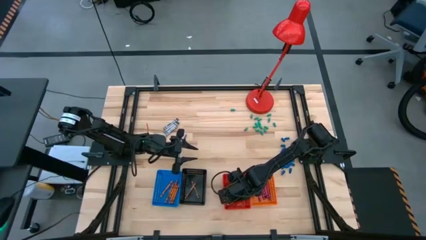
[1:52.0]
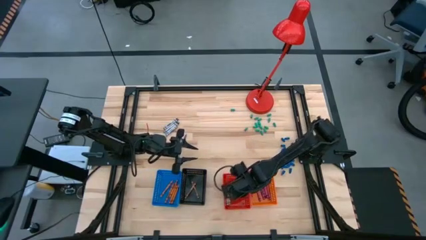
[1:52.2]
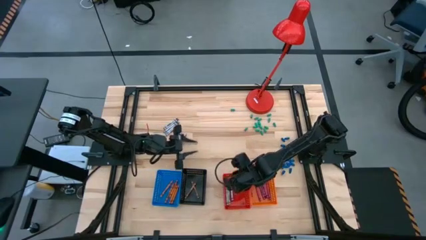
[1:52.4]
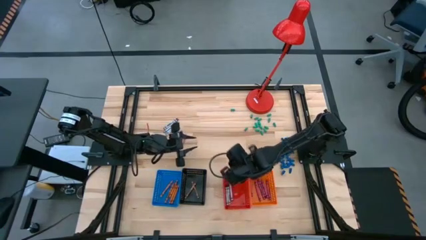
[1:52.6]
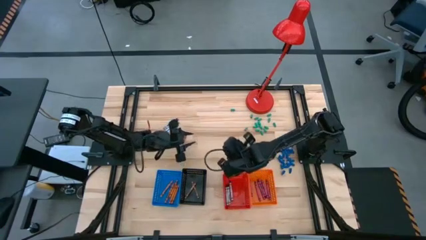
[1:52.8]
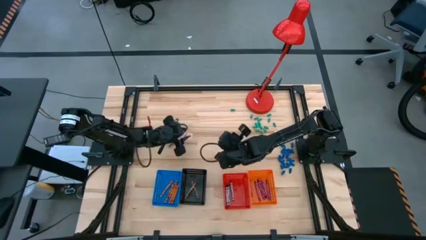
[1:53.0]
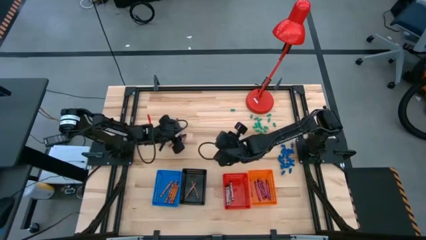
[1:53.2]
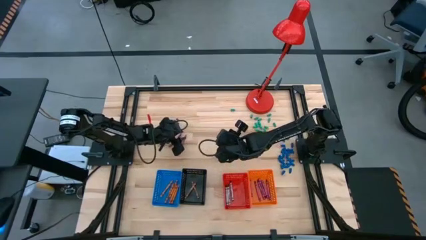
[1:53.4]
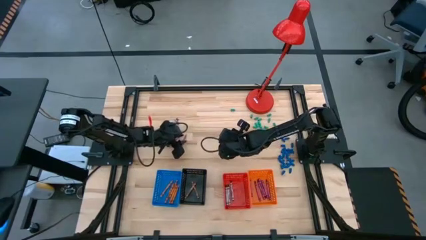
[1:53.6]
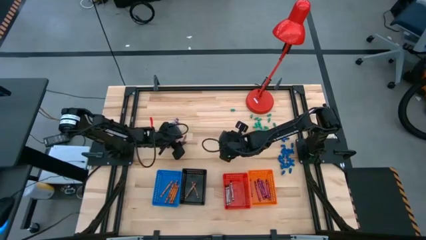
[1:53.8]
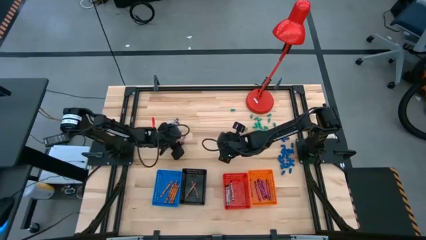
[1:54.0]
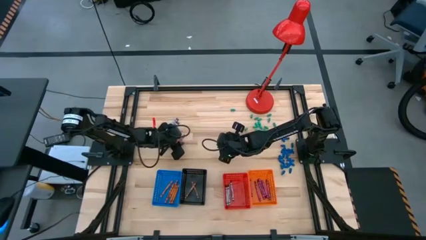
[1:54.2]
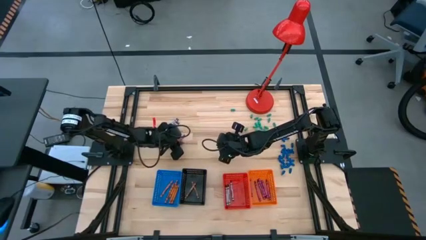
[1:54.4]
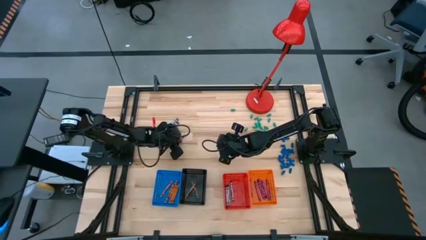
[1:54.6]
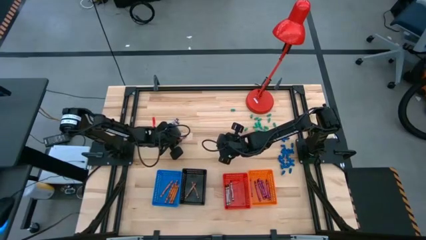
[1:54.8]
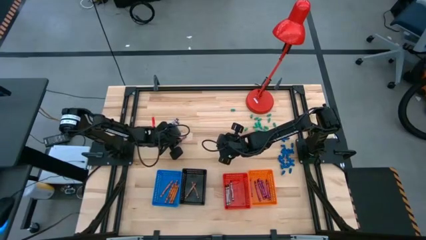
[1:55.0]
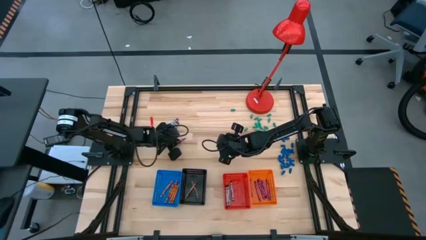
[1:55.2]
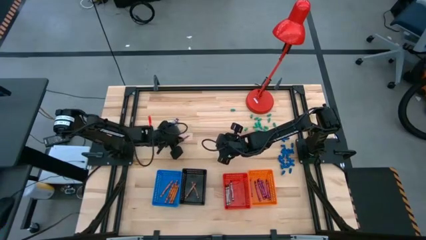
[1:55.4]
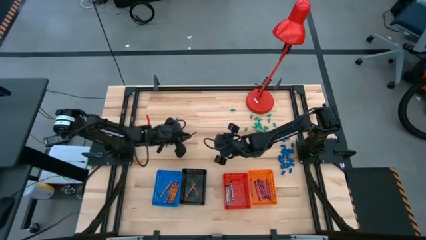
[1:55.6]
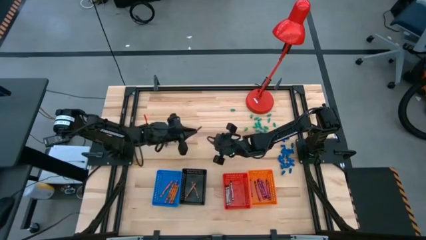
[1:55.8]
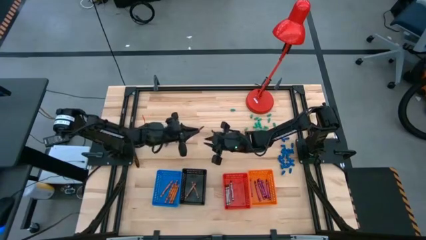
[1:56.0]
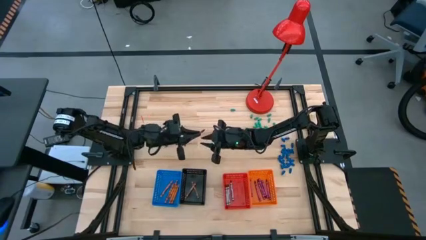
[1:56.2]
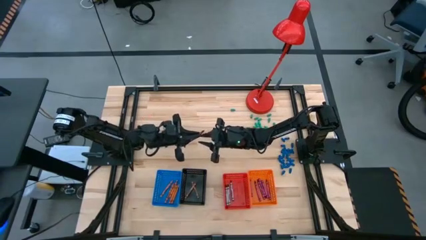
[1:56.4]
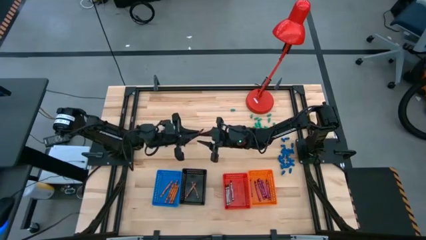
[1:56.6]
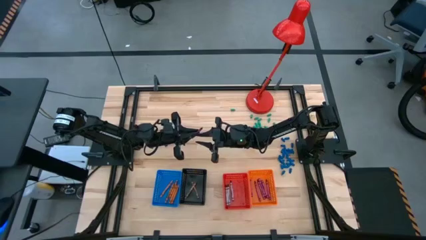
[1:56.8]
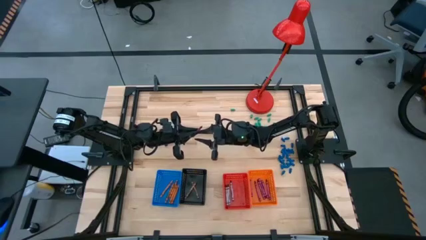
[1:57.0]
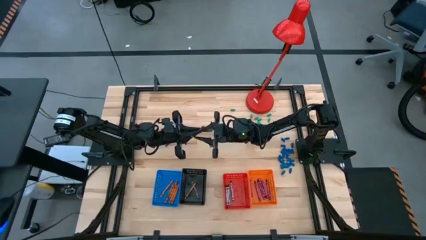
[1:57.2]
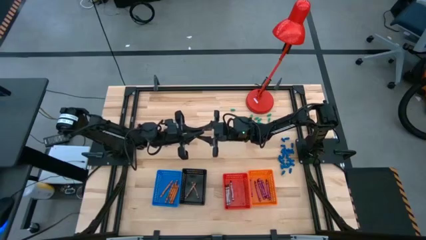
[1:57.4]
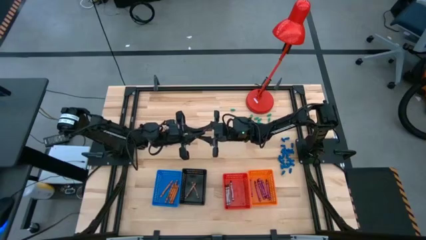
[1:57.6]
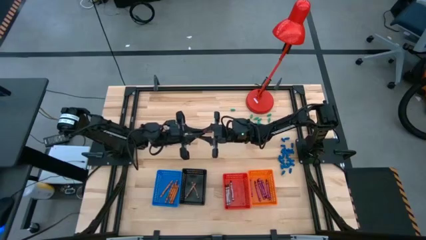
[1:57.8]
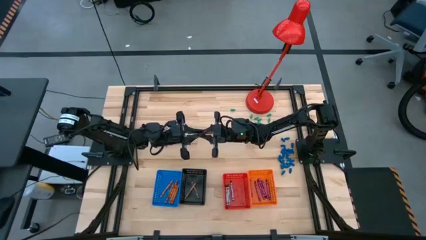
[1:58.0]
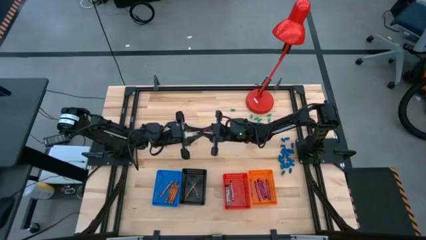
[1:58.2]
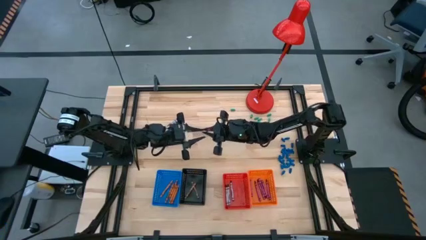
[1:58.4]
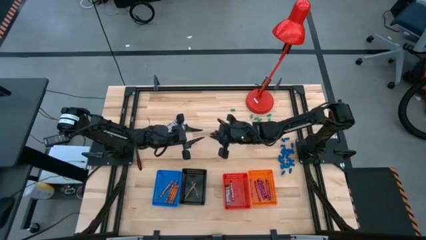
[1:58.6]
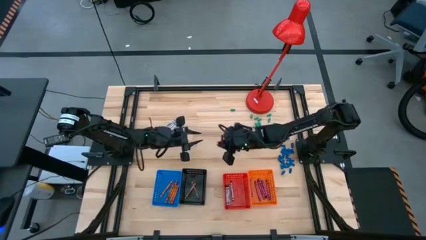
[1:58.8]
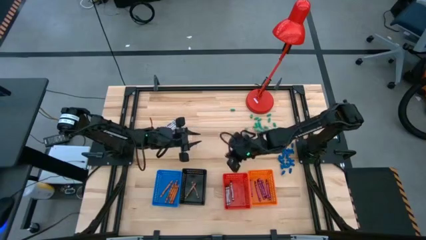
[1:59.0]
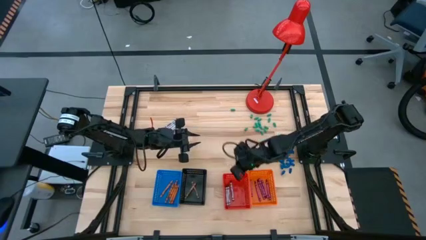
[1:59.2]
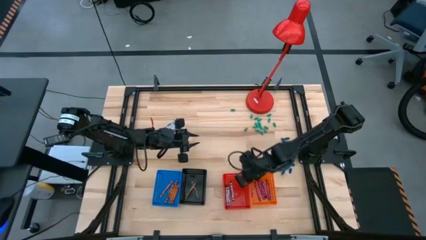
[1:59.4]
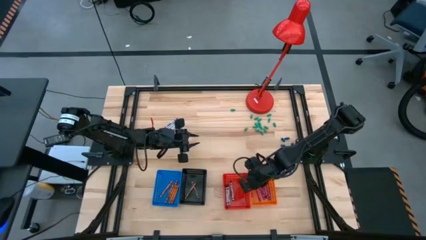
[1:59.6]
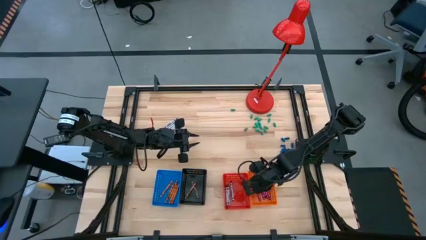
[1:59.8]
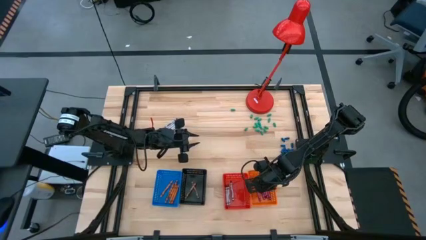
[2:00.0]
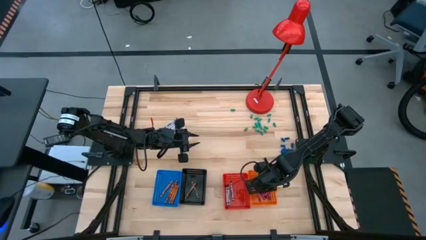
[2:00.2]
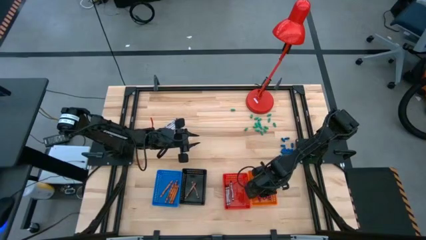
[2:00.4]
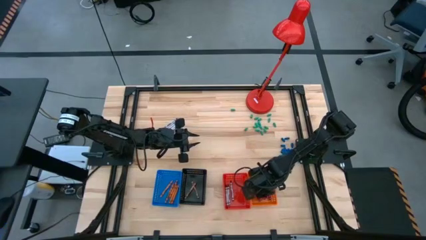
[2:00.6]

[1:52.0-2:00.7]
Task: Sort crayons
Put the violet crayon into the orange basket

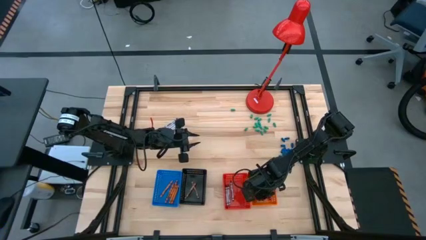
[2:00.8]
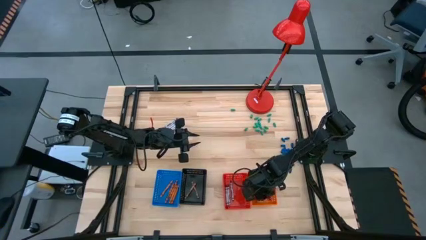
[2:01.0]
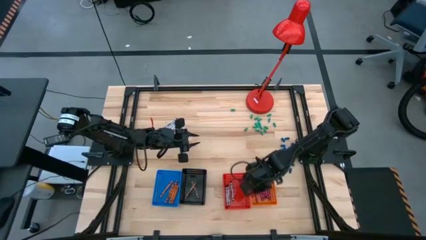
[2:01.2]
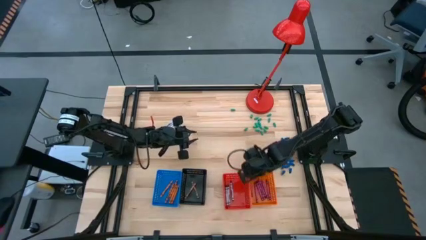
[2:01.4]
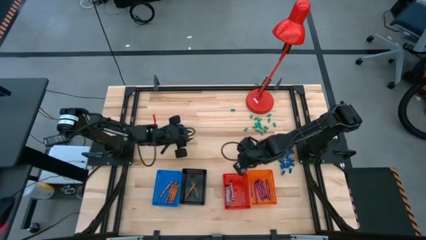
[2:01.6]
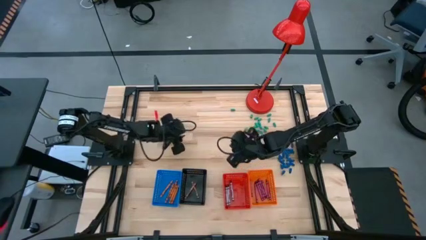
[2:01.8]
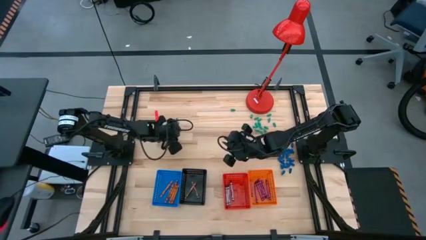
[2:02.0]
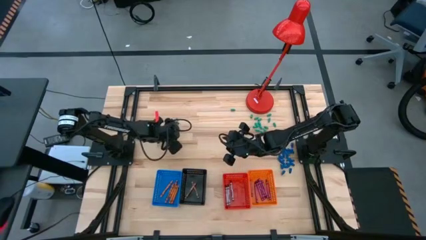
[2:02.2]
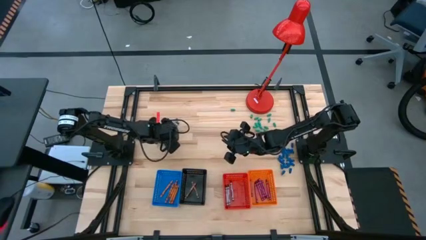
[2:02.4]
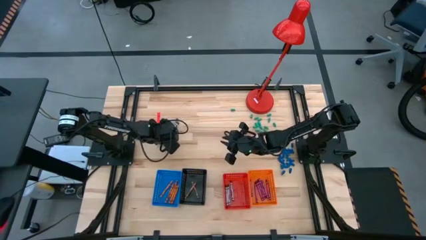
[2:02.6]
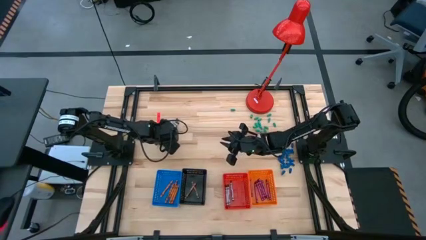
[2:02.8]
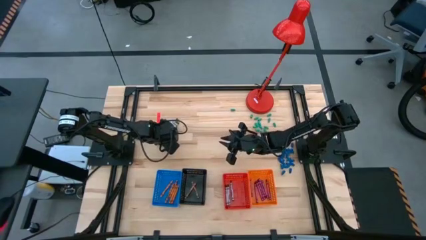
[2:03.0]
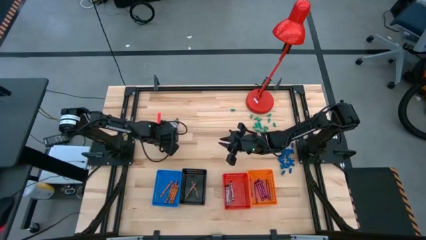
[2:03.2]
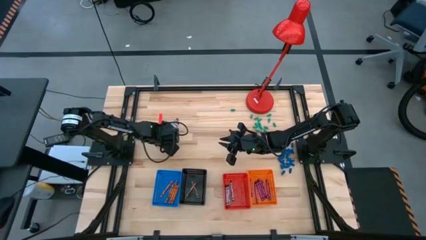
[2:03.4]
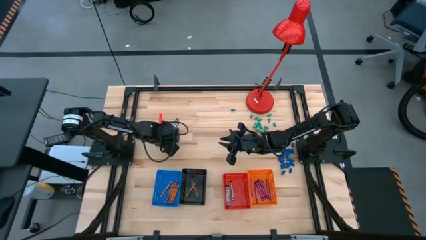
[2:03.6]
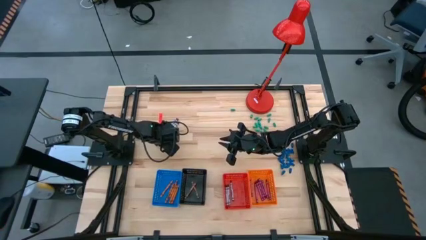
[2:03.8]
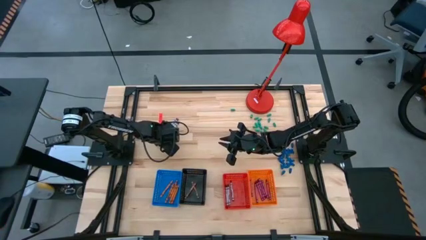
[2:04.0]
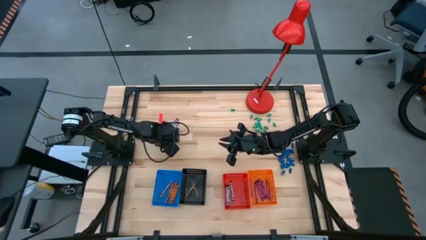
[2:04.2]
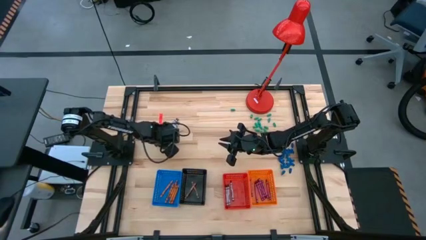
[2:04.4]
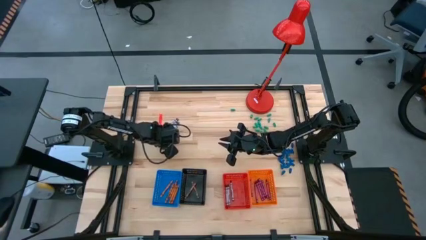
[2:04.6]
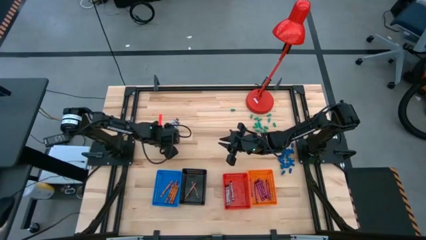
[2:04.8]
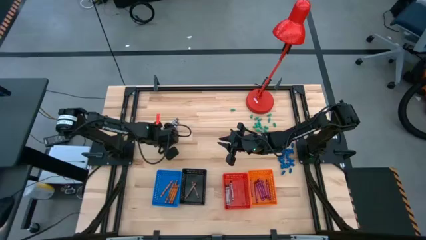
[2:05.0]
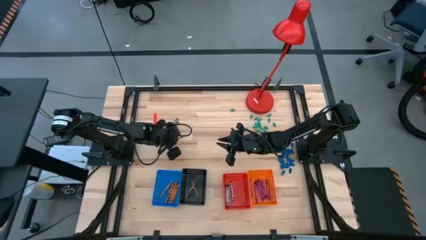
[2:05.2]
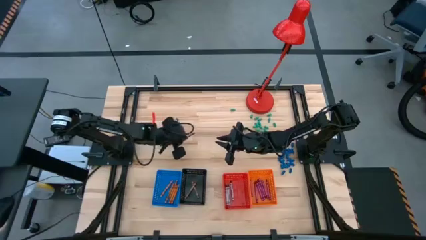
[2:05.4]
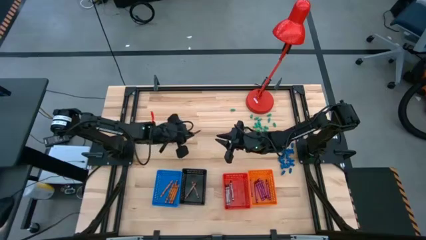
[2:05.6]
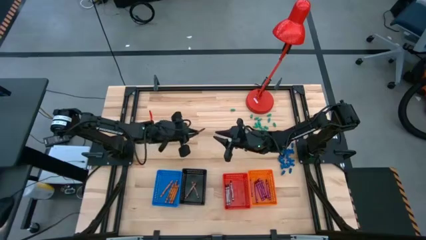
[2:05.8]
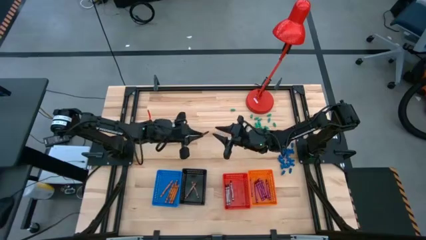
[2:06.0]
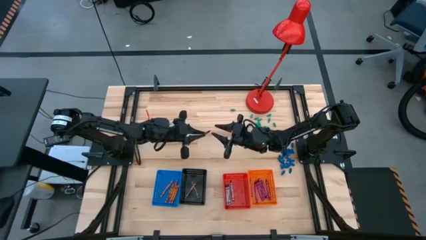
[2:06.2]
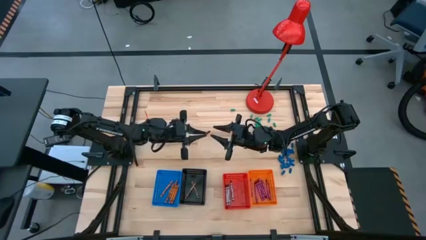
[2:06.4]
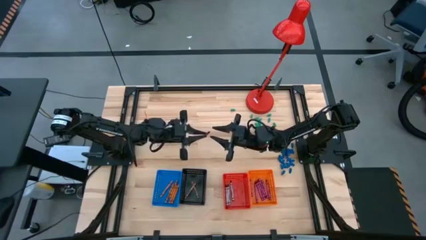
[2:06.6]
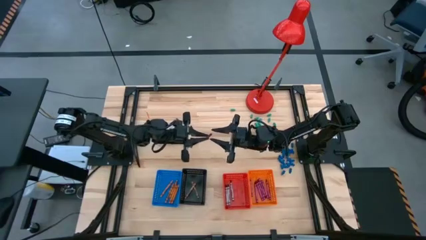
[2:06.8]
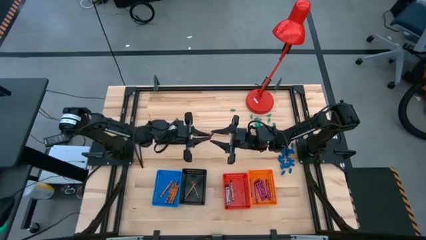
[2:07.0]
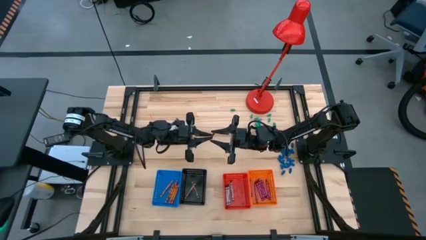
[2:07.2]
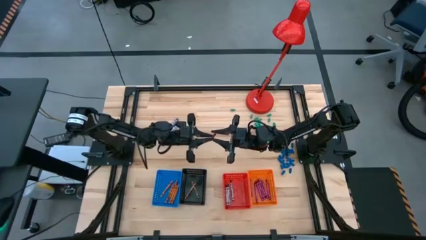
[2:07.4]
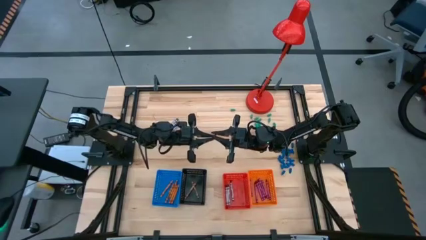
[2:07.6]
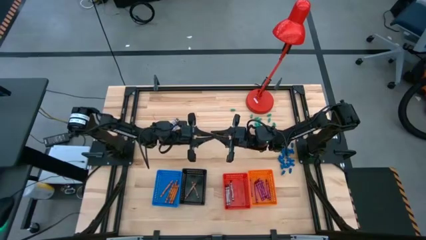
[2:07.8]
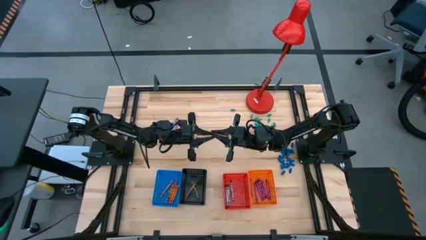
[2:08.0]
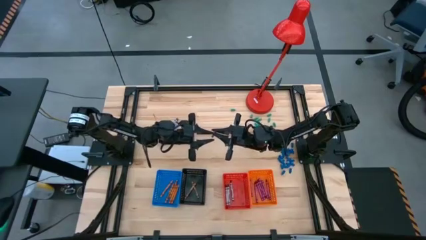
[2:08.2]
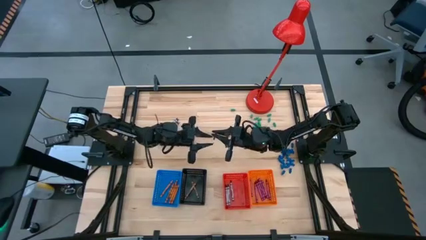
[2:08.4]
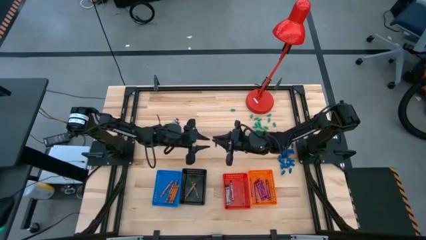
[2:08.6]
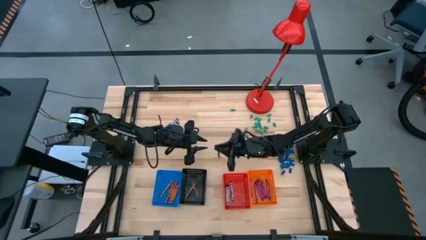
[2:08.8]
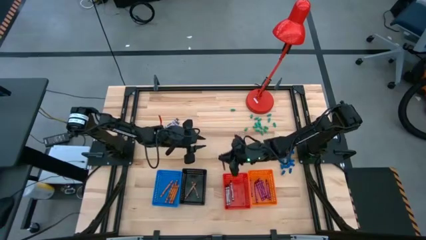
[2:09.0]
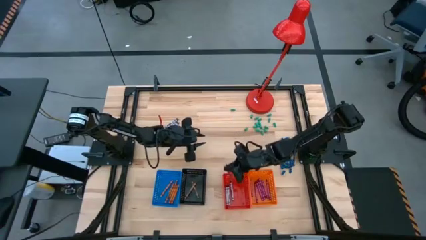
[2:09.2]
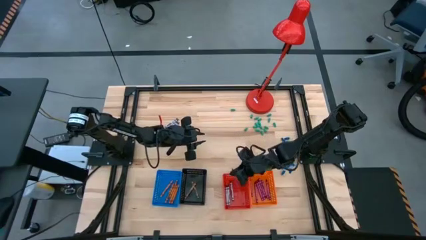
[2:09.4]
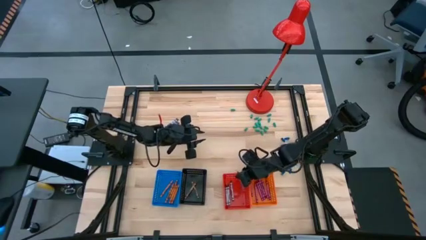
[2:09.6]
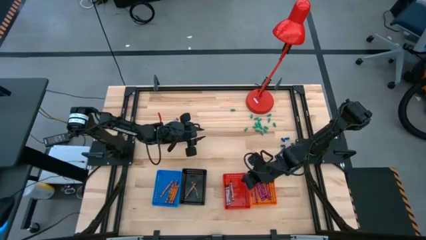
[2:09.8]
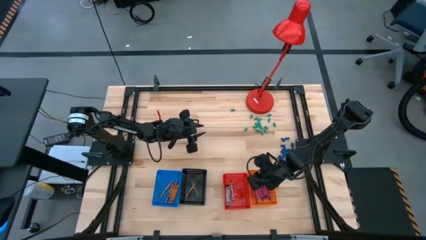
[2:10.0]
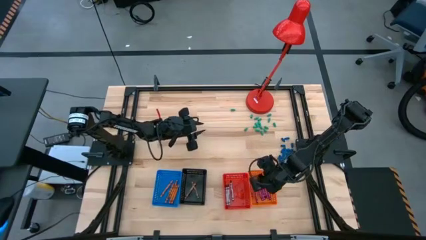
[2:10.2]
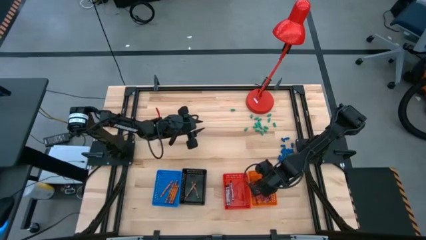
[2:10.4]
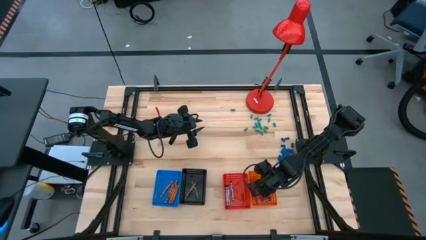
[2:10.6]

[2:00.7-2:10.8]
Put the violet crayon into the orange basket
